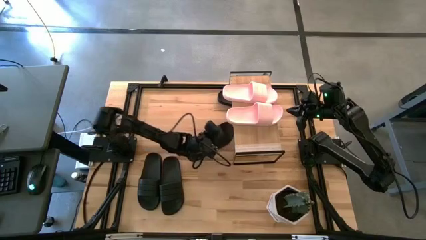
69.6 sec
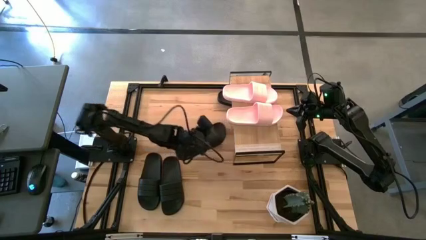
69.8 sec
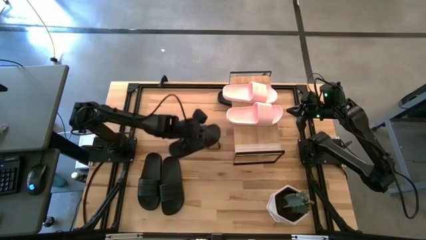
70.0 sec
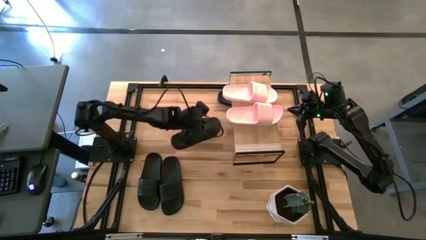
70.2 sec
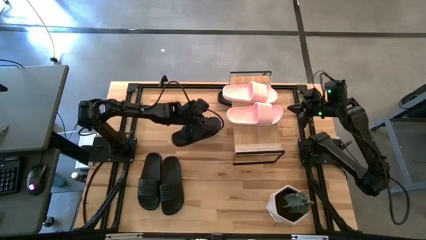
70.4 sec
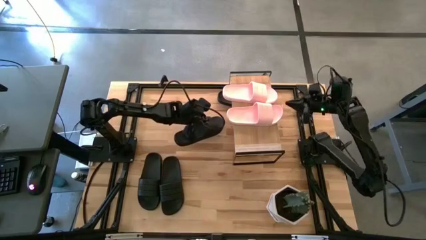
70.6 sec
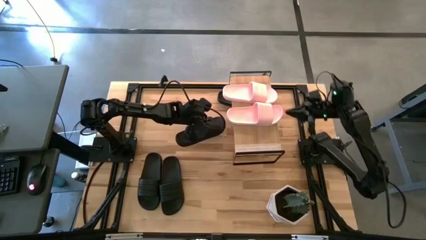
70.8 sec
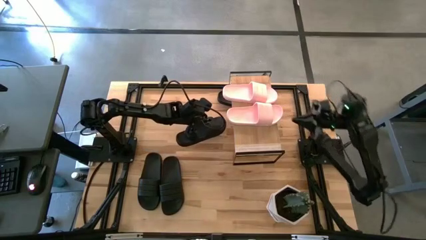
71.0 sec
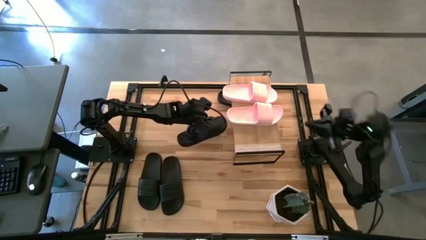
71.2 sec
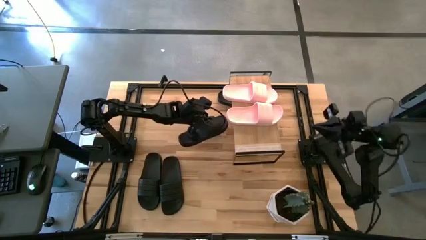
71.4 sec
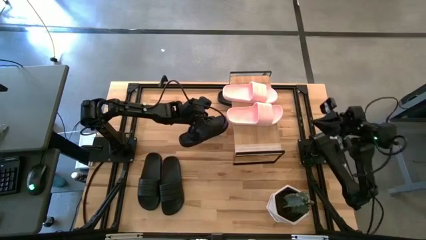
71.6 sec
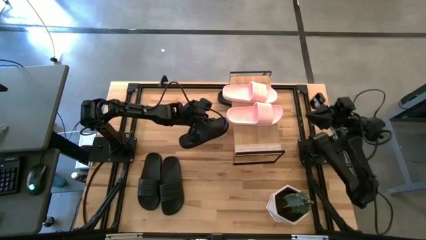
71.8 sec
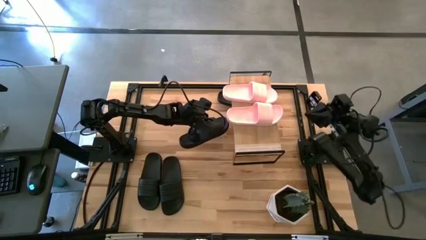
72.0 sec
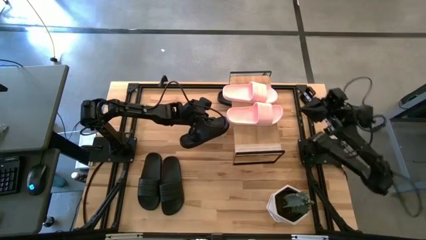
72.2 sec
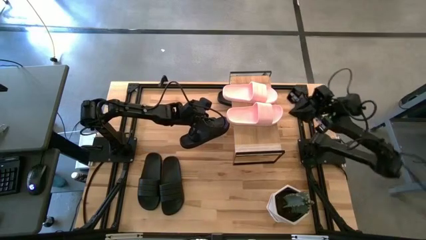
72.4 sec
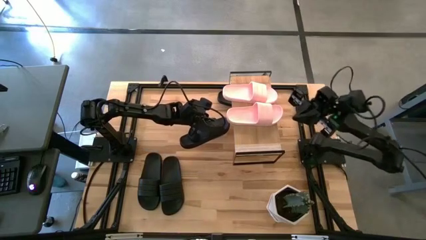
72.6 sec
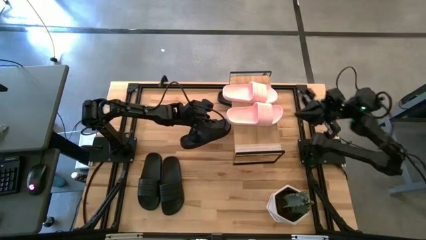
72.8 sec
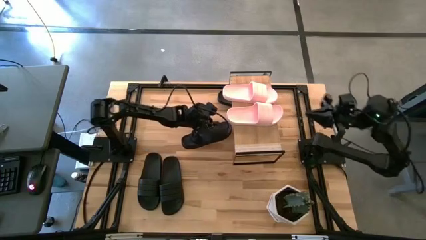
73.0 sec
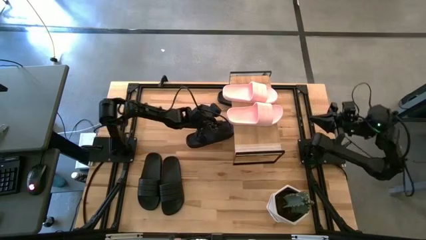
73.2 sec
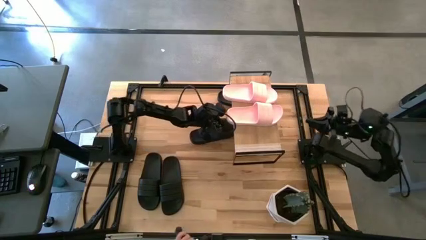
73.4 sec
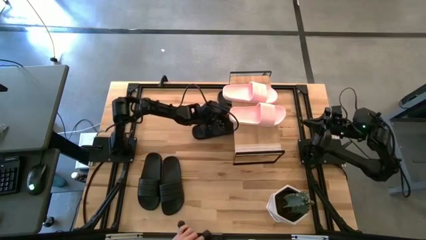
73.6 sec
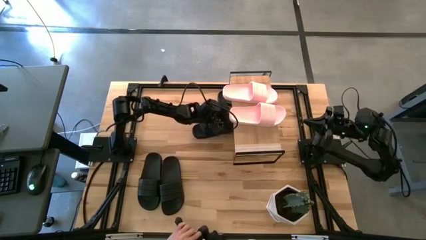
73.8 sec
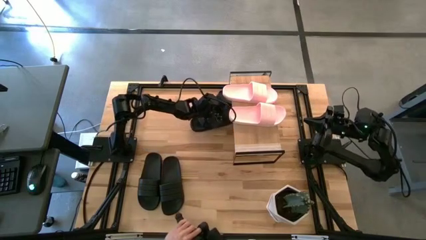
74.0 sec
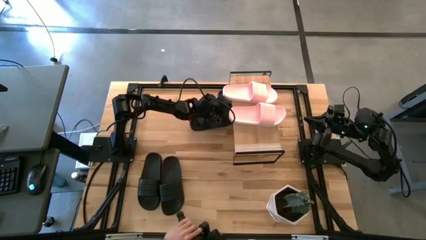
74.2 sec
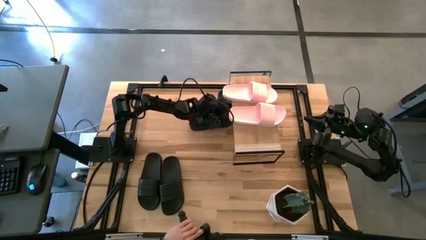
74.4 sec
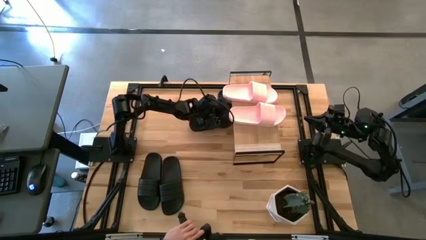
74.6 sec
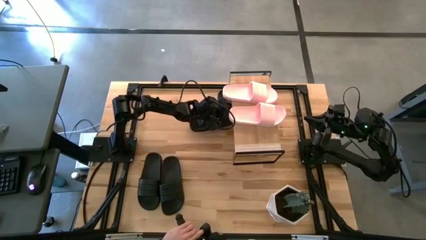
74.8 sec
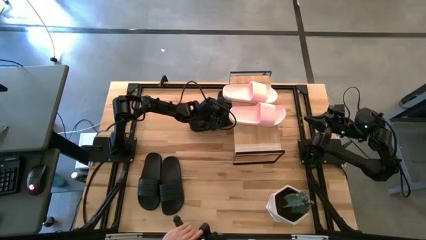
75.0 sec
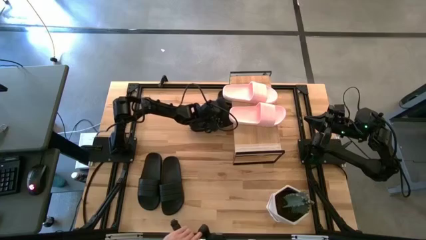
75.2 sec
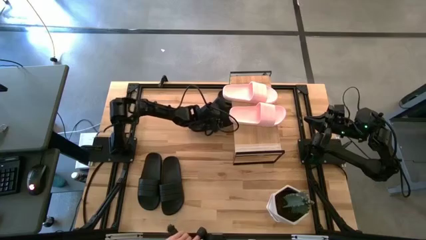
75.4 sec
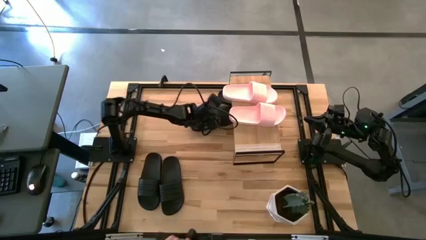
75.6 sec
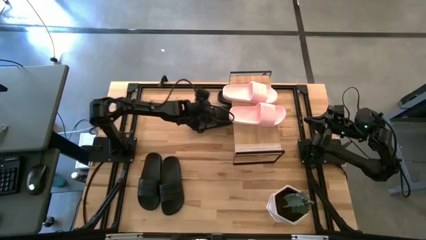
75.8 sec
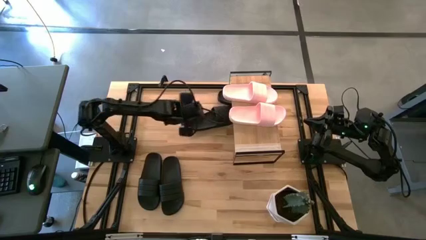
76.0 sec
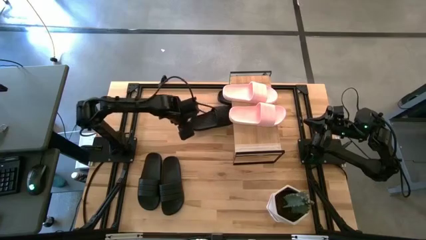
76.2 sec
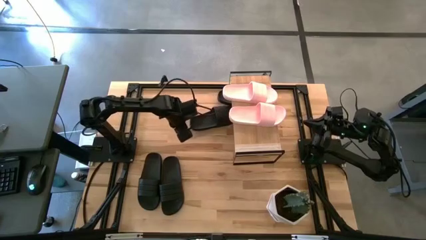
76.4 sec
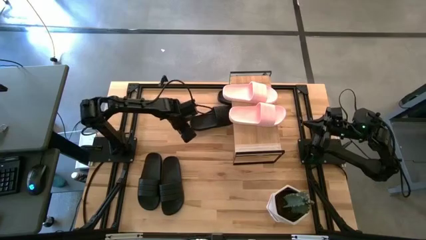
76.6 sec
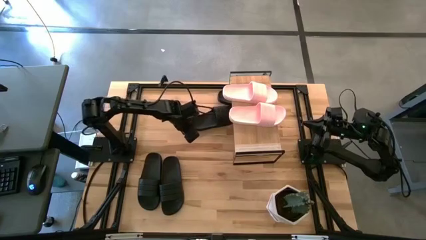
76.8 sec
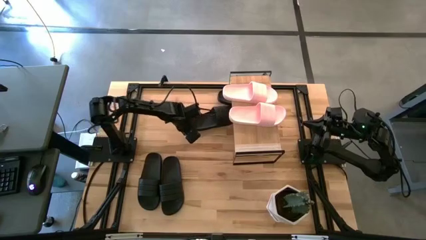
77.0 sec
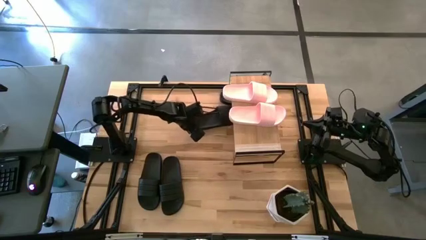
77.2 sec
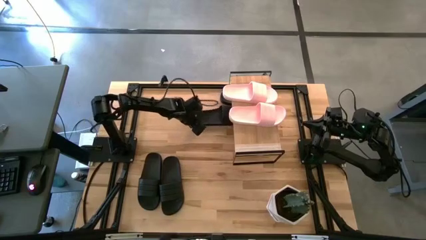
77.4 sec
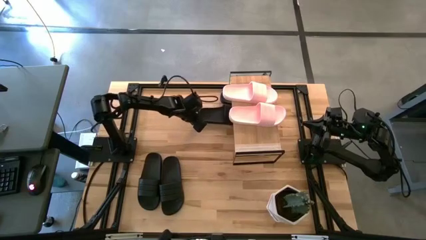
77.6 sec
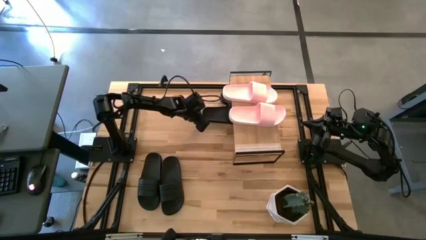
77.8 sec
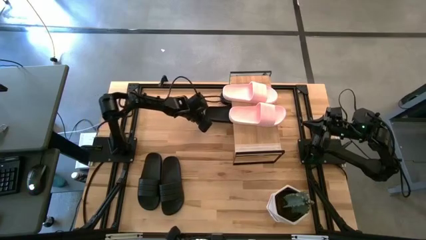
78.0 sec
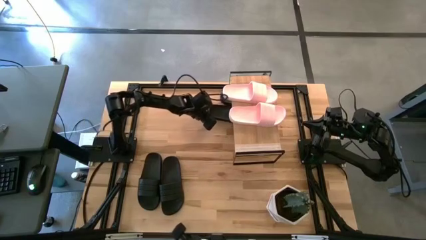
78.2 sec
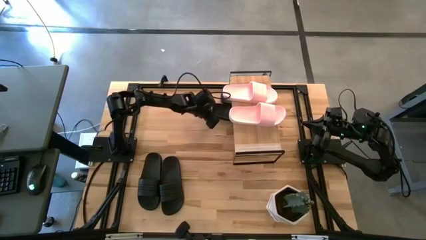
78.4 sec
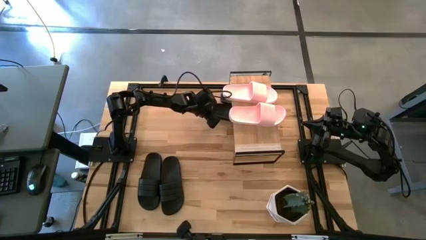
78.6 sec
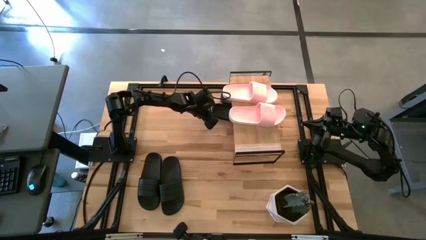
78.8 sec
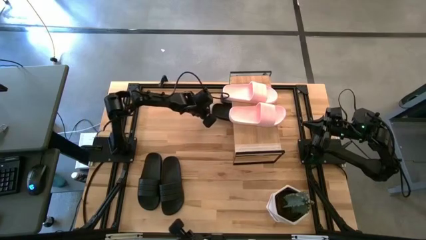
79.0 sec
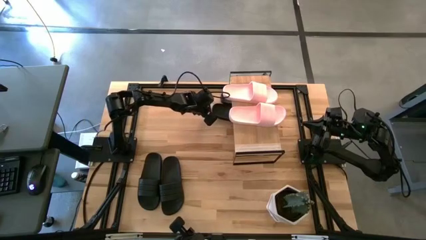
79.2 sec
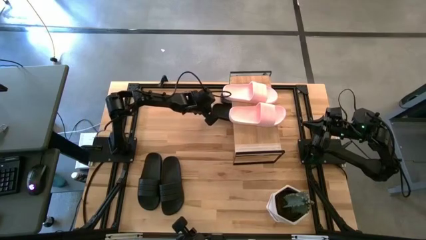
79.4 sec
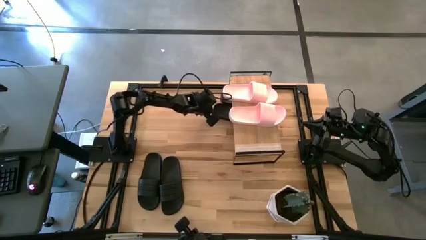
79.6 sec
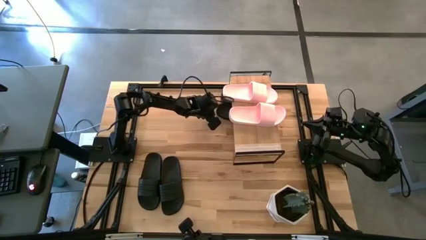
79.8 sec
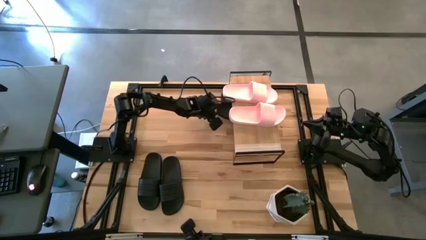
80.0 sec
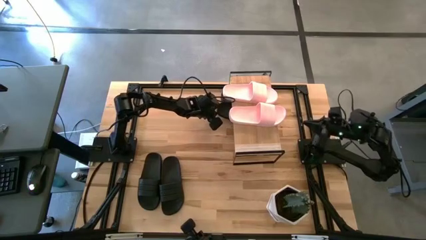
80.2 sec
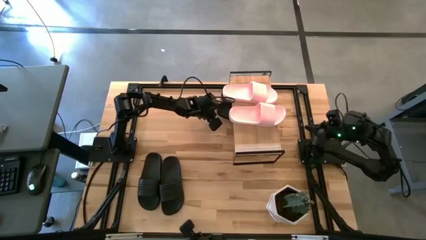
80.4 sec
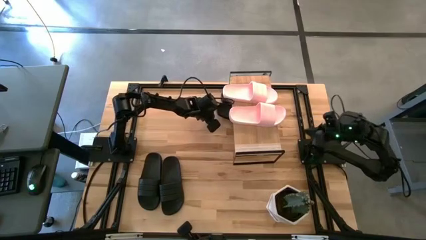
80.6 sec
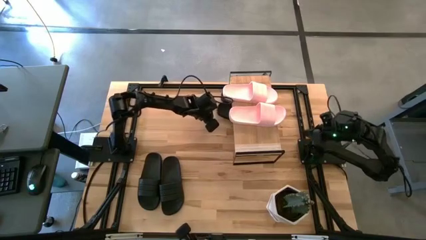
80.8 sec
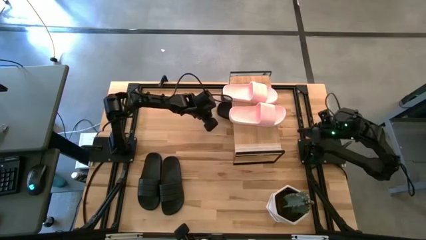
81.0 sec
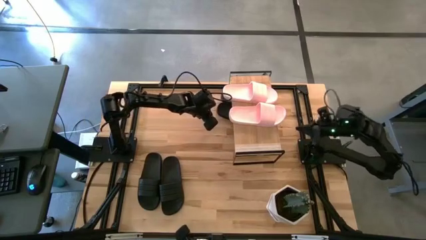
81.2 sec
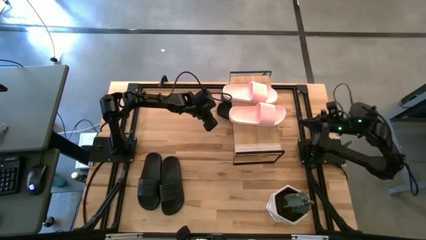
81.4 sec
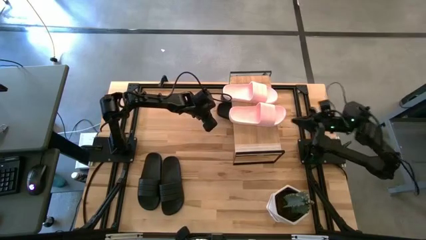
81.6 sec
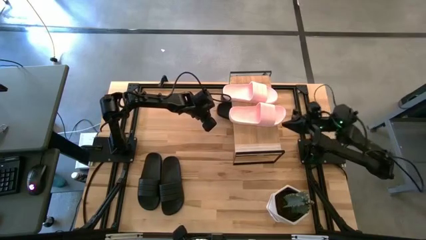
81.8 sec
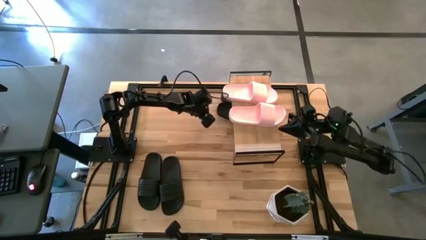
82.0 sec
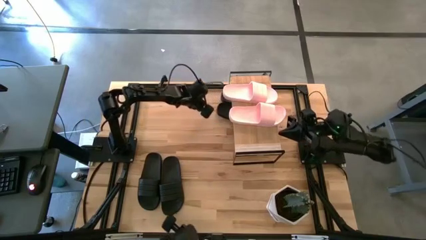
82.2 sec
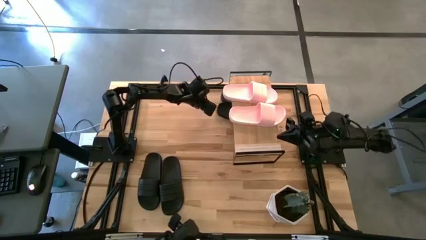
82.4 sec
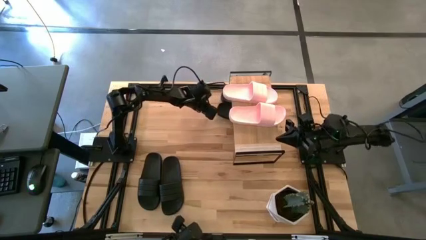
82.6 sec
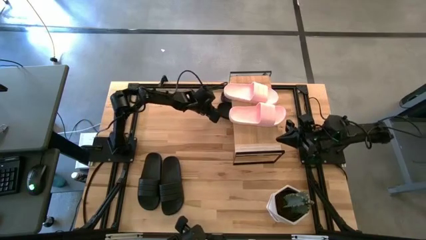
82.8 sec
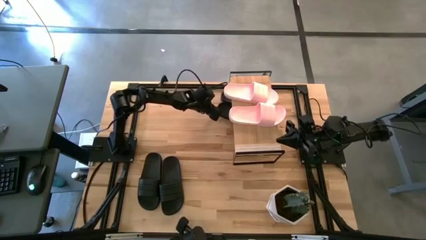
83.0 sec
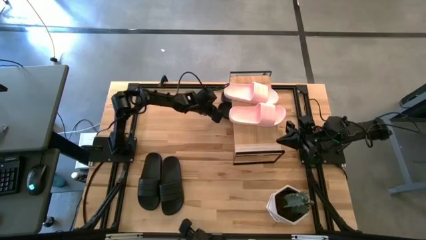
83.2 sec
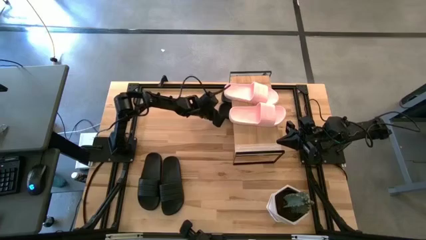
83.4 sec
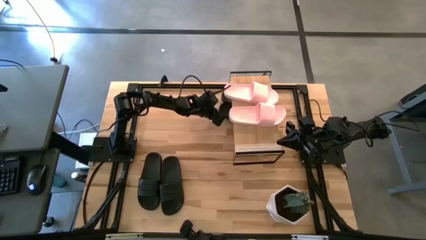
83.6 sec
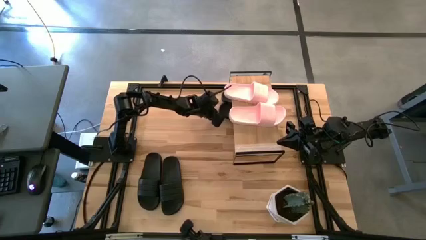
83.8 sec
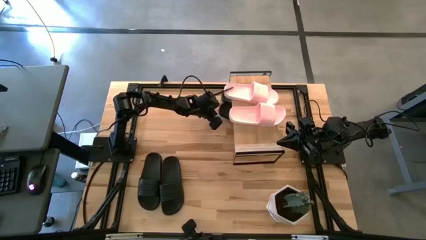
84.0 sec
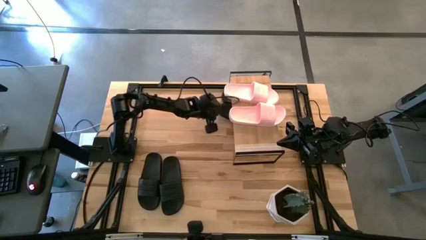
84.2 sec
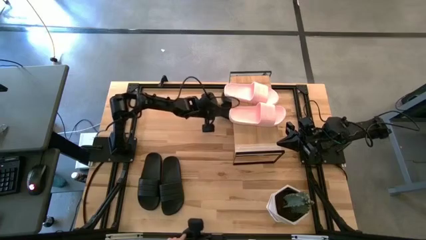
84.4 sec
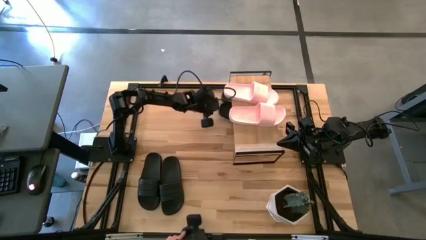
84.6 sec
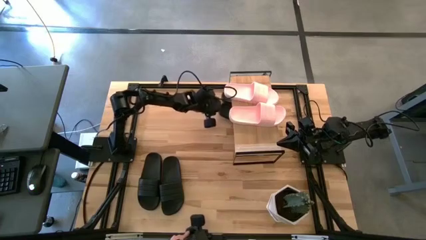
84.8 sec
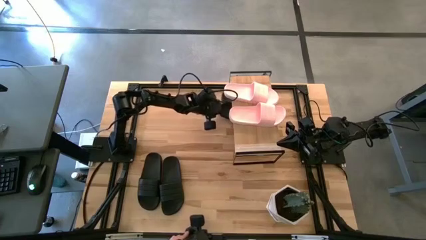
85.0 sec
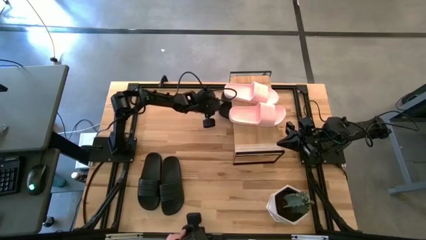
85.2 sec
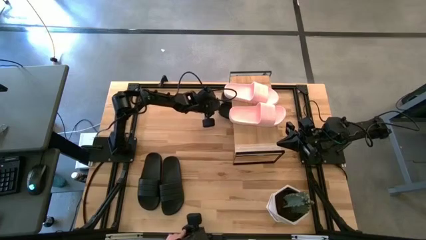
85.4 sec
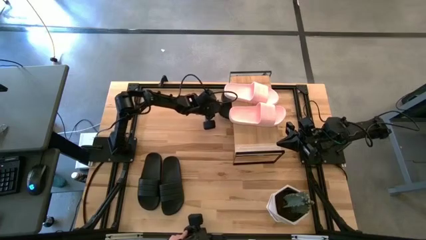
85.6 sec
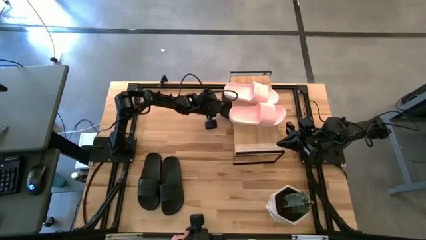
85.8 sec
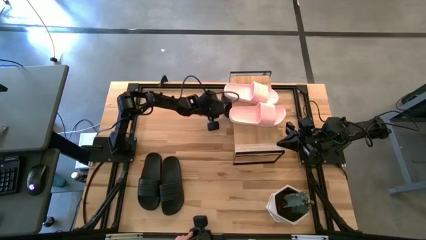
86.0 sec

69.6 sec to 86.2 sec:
Task: Pick and place slides into the shelf
Adjust the black slides under the shelf
